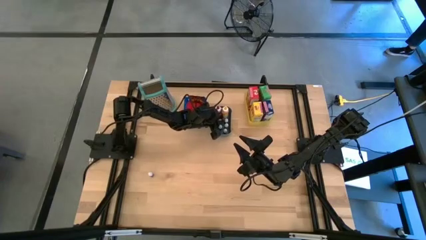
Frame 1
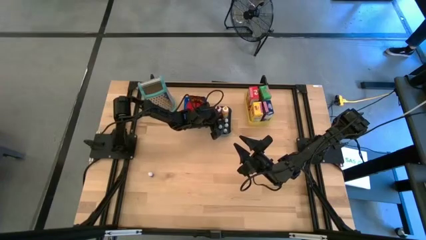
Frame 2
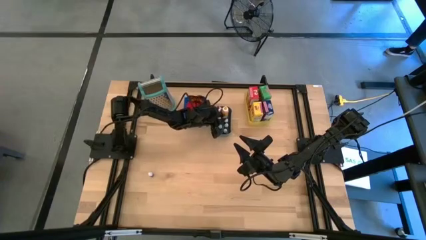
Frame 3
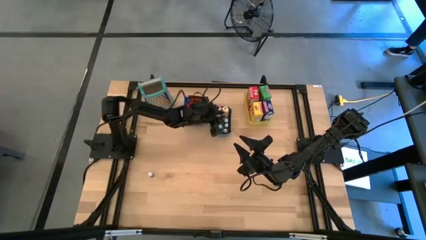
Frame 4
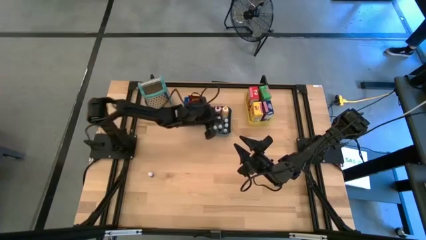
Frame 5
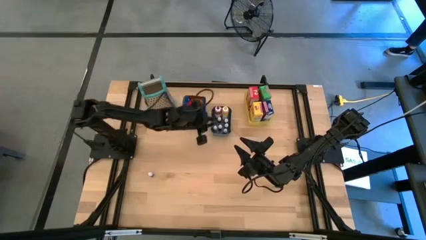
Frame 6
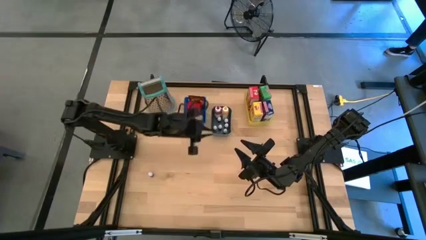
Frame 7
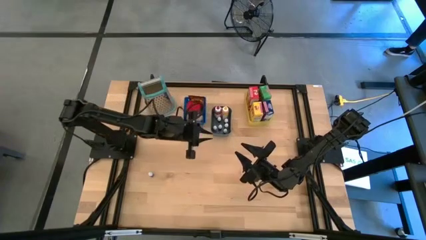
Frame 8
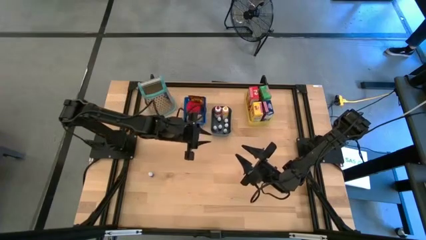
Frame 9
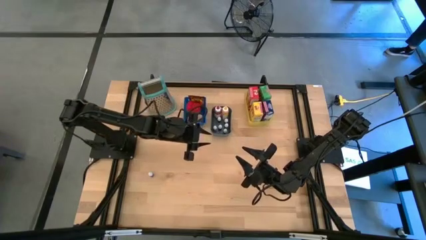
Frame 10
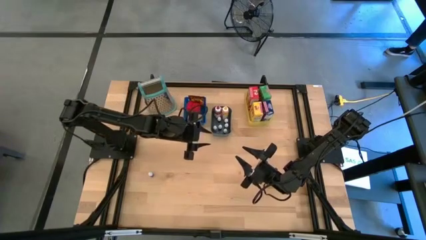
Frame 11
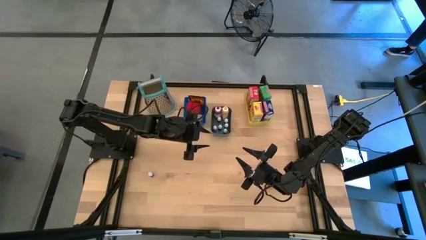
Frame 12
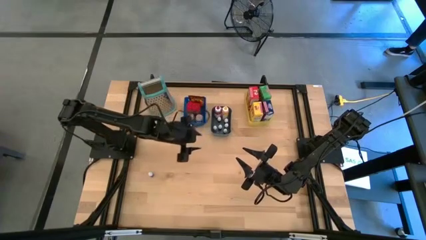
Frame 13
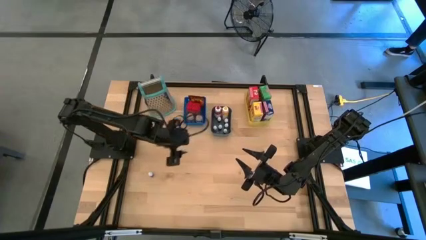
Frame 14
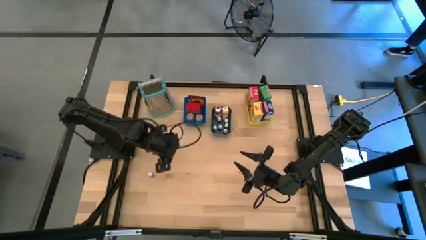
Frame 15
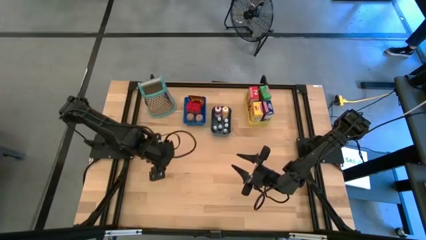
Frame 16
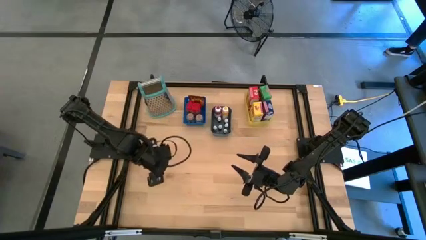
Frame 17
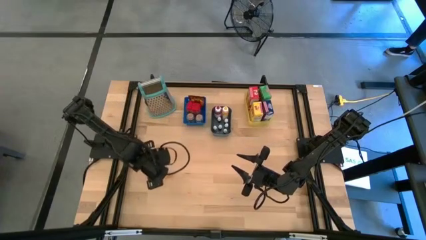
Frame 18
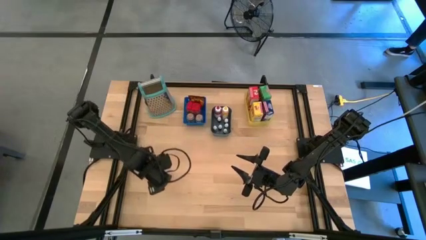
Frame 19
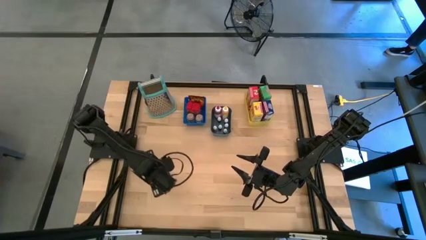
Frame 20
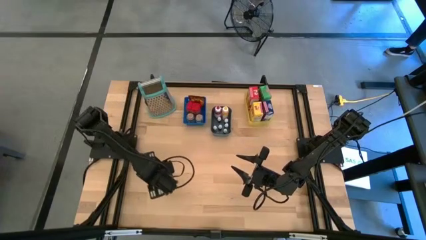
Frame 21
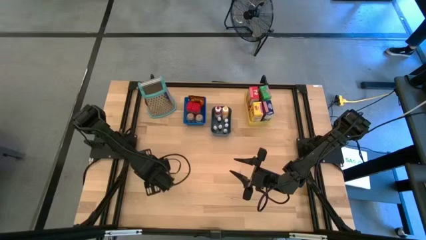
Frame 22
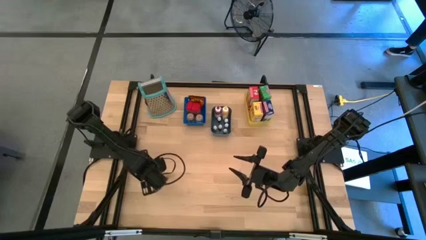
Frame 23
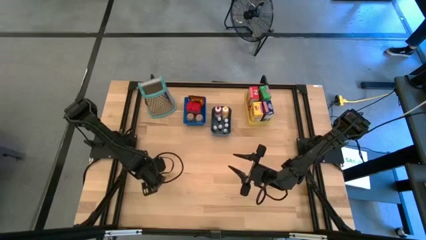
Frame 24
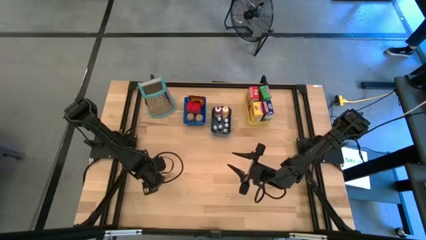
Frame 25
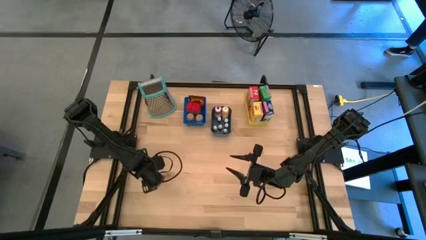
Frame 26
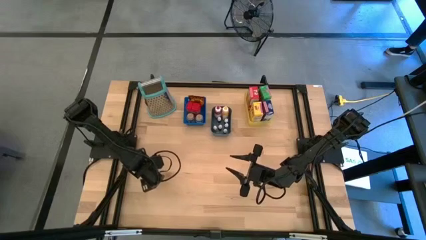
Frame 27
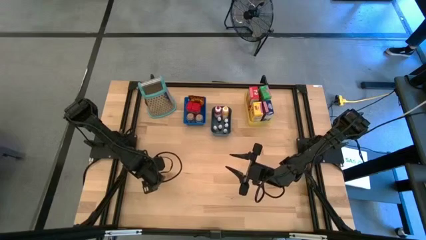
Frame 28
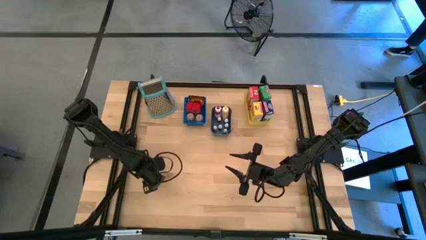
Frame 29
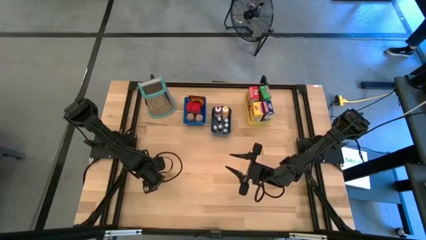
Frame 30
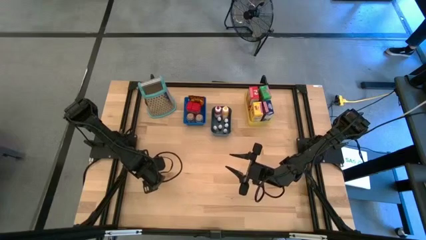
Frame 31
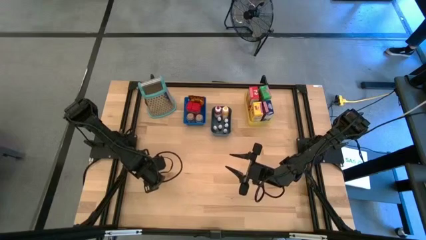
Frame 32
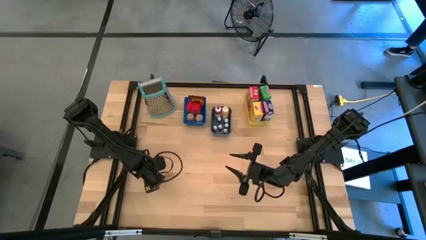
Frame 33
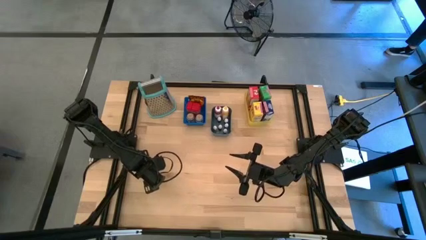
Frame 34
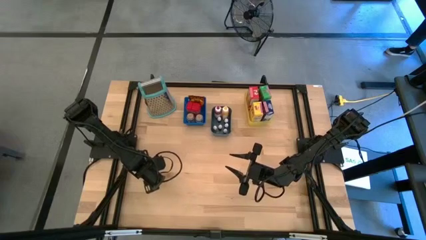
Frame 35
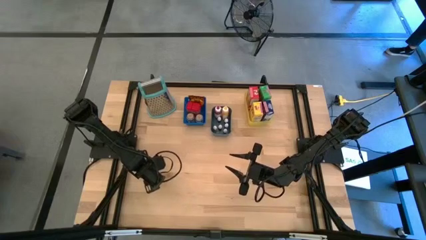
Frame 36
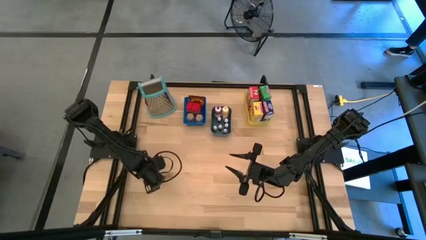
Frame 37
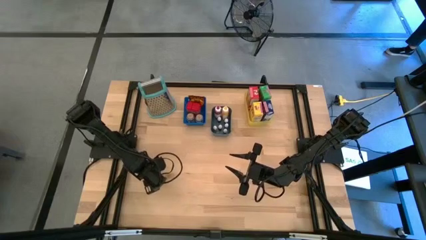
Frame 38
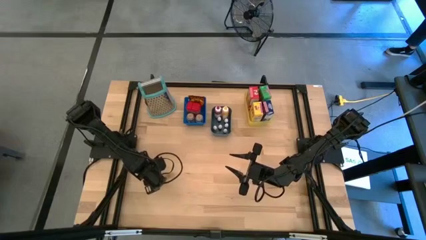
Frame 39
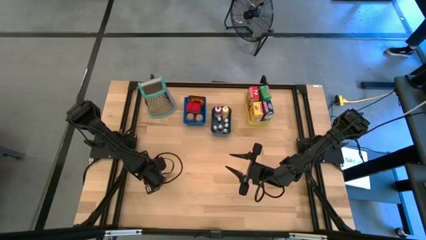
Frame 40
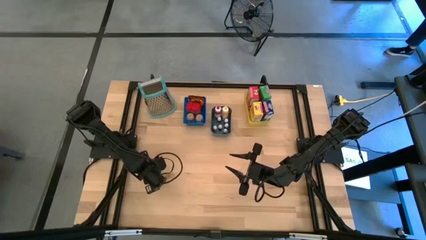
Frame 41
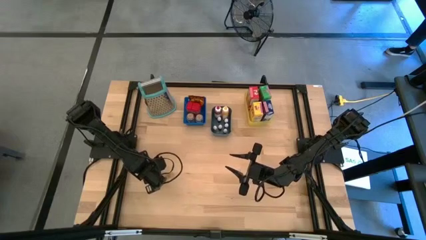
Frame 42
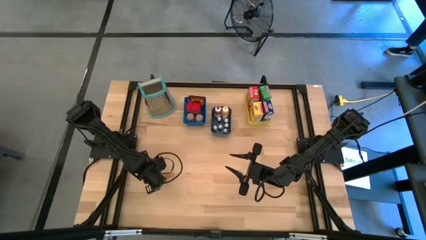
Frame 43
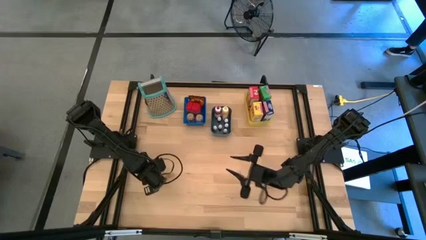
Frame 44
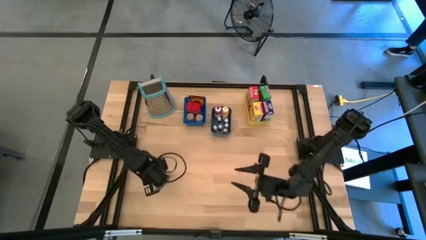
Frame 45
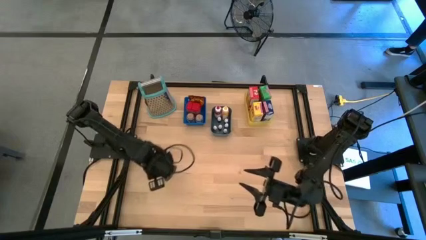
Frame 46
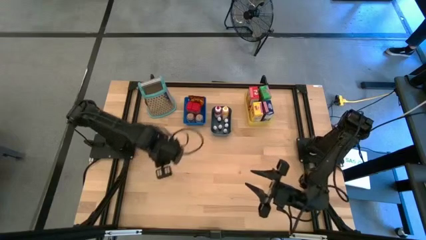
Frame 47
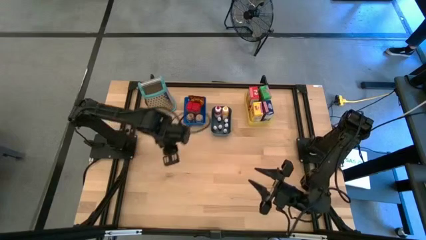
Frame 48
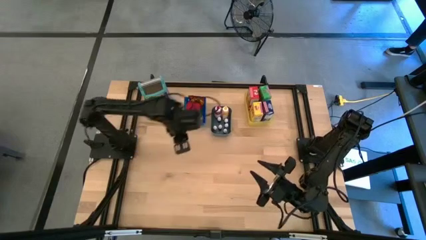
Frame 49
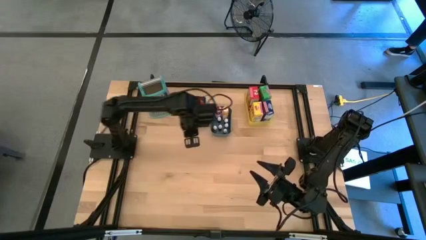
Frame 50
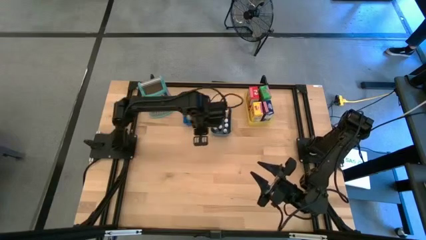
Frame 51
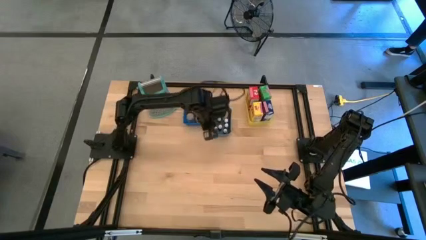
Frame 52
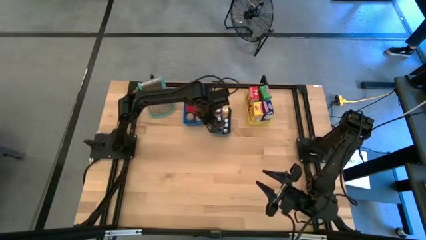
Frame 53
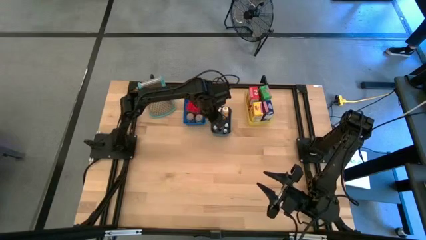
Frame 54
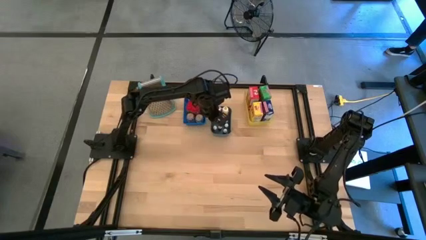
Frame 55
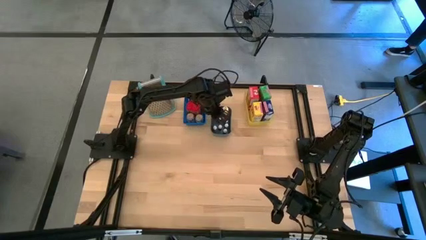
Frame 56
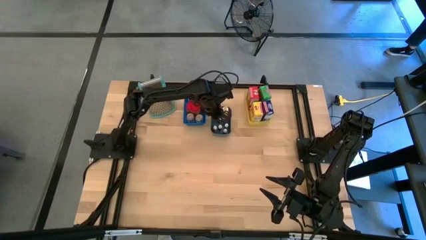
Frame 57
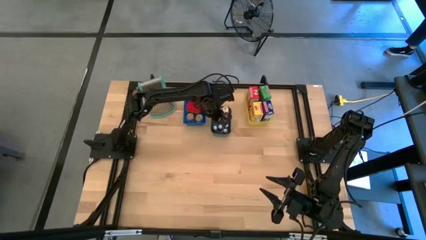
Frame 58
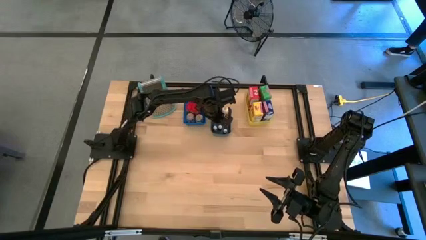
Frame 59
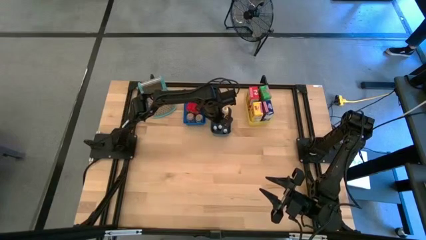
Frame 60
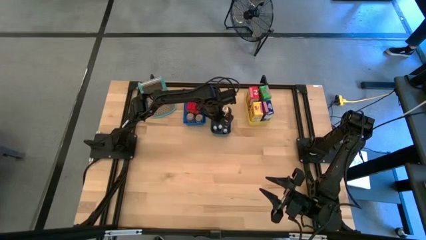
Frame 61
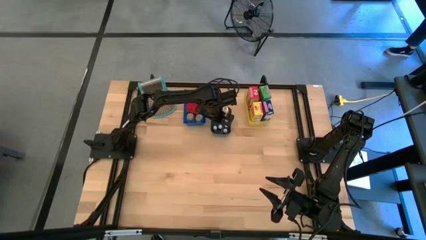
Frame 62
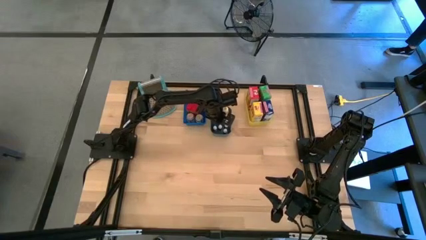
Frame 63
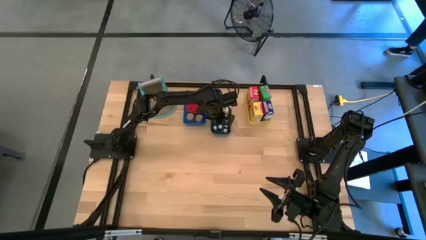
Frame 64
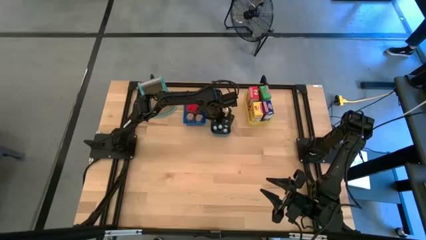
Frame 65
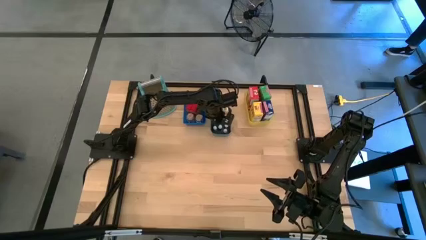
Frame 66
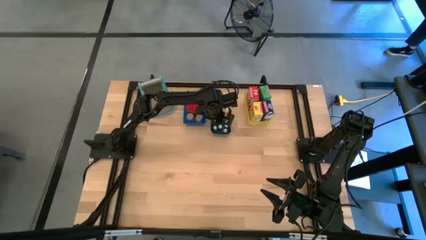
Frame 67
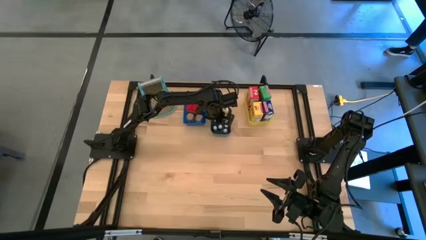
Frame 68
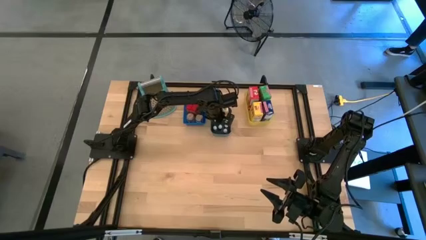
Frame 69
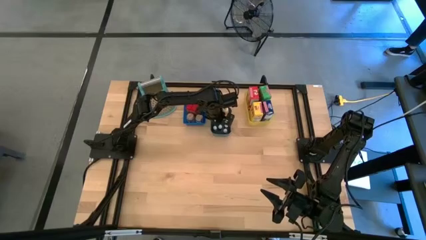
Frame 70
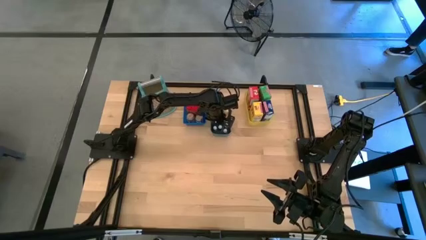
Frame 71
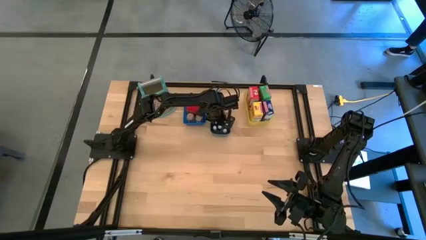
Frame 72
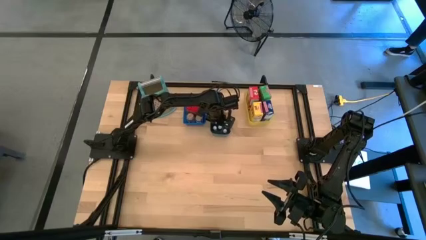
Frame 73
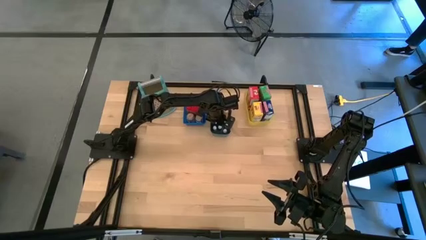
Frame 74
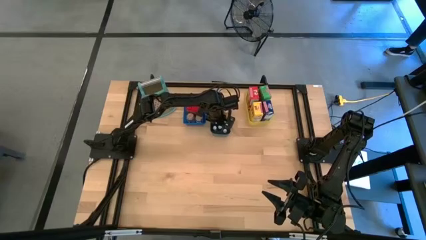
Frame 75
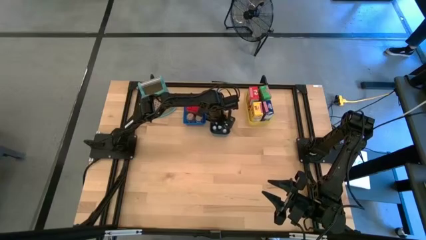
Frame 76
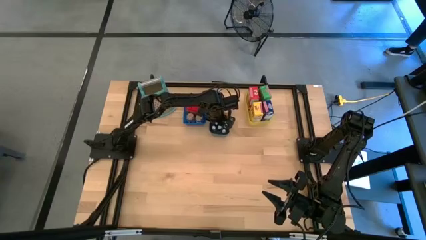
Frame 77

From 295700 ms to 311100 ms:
Task: Pick & Place Kitchen Items
Put the small violet food coloring bottle into the dark green bin

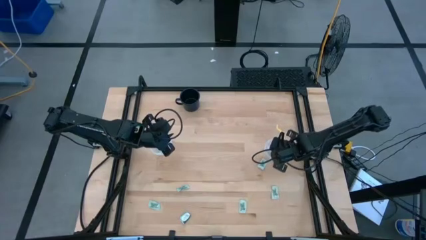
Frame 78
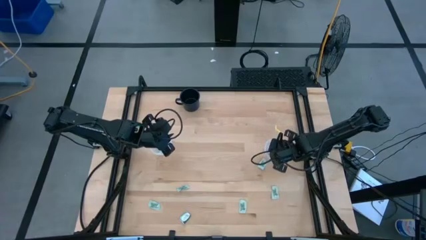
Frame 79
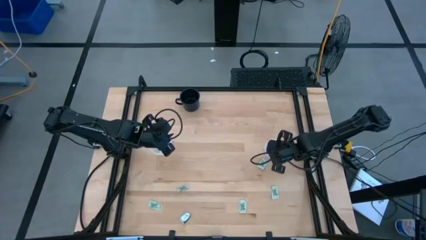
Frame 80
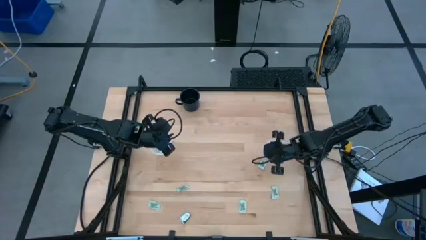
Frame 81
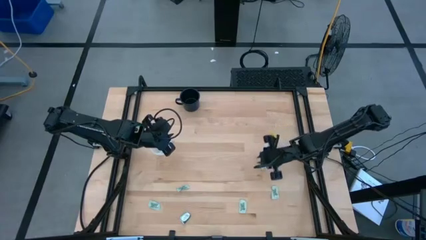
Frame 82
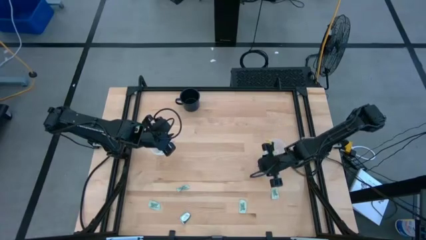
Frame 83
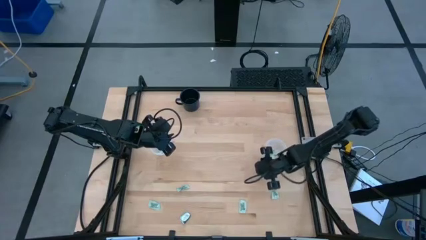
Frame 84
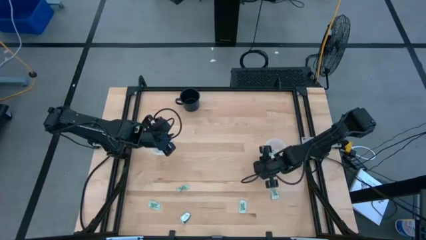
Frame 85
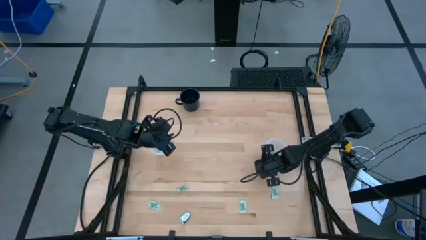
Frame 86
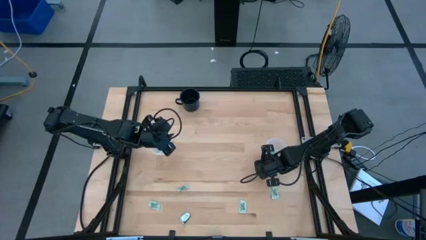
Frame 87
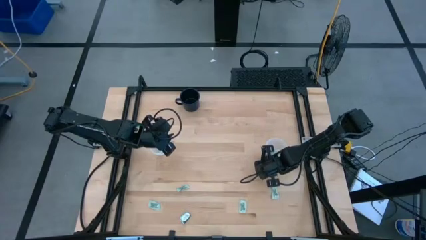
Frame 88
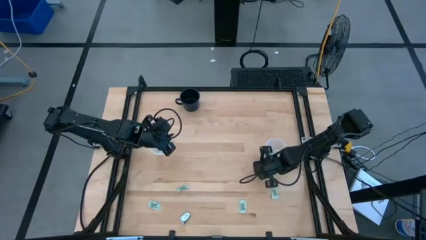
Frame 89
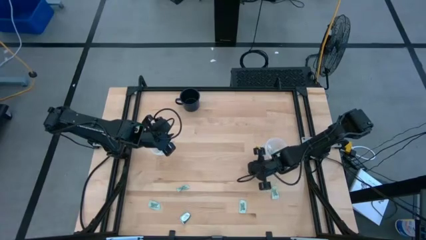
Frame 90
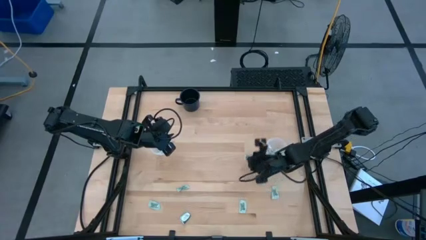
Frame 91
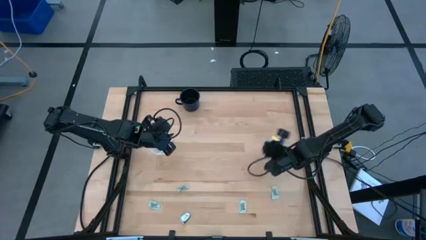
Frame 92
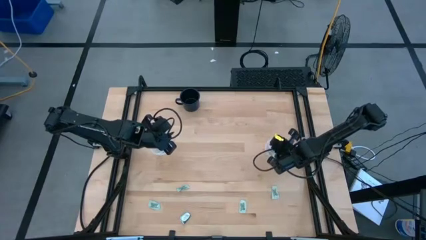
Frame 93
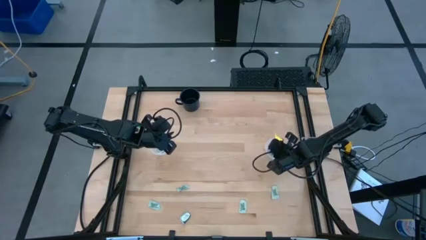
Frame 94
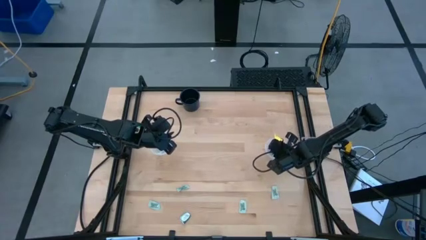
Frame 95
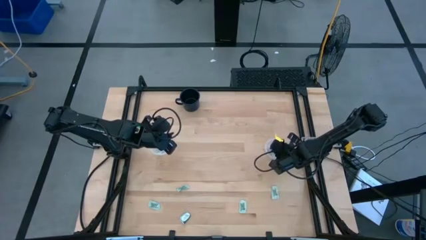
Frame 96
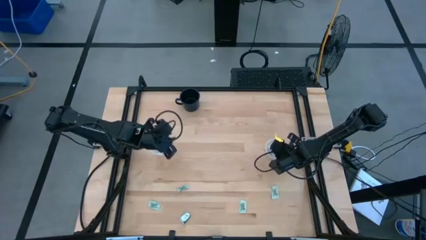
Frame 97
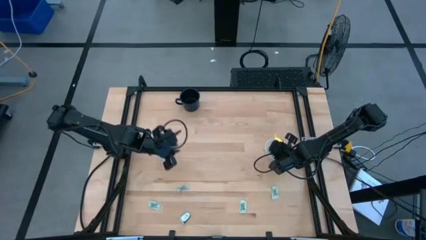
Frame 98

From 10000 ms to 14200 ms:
Task: Pick and place Stevia / Truvia into bins
Put the stevia packet into the right container
